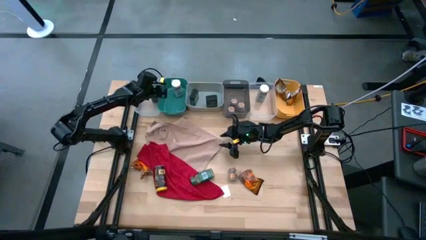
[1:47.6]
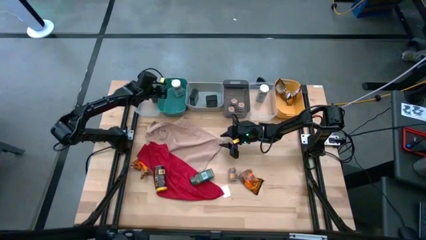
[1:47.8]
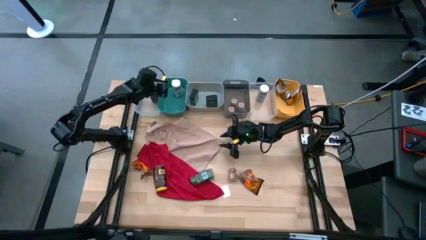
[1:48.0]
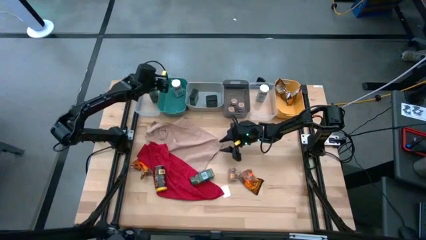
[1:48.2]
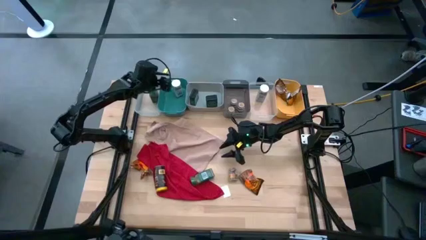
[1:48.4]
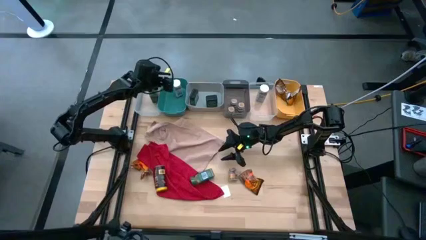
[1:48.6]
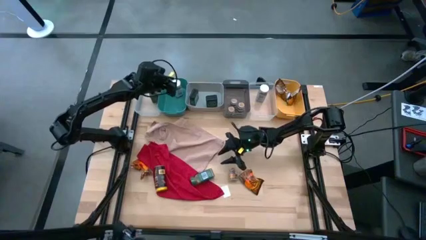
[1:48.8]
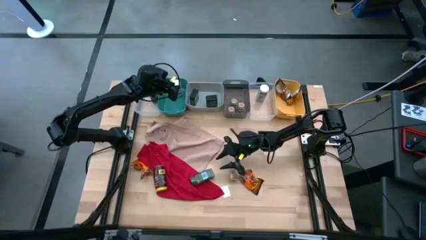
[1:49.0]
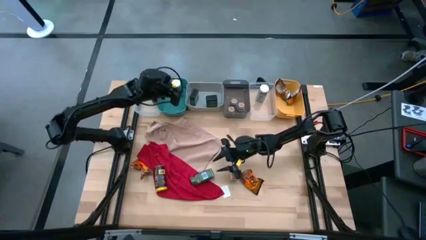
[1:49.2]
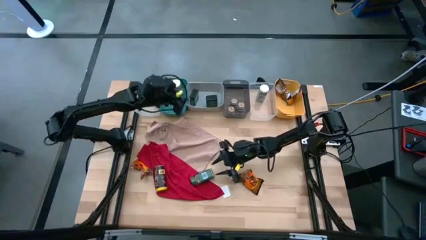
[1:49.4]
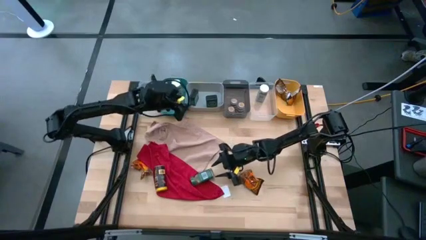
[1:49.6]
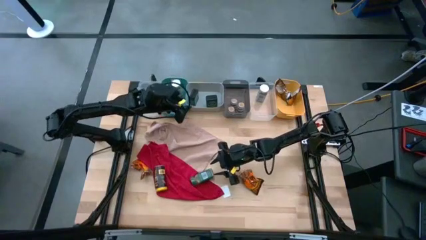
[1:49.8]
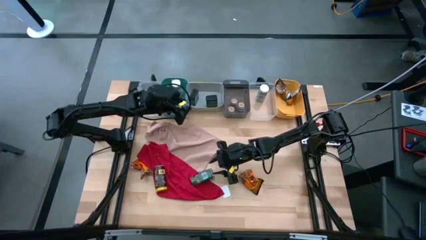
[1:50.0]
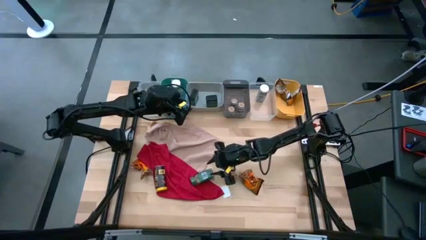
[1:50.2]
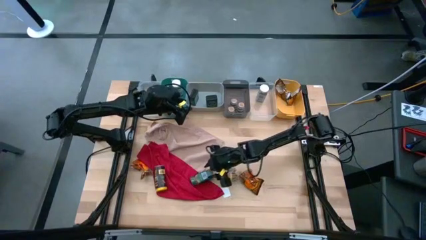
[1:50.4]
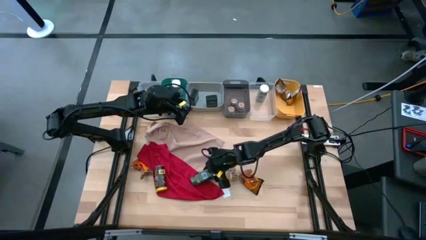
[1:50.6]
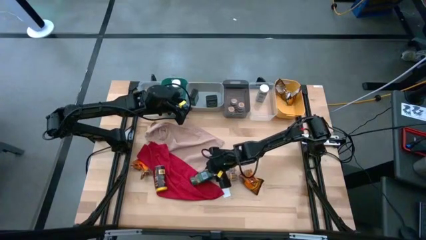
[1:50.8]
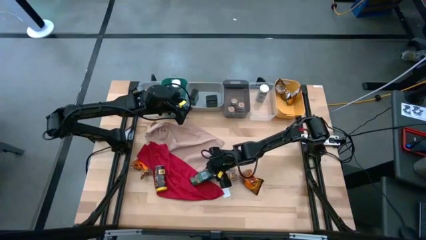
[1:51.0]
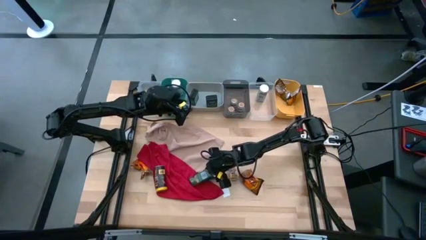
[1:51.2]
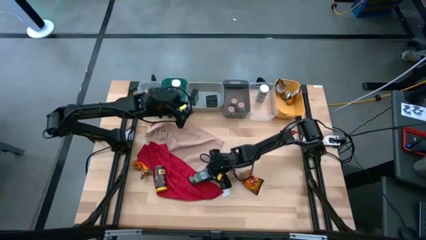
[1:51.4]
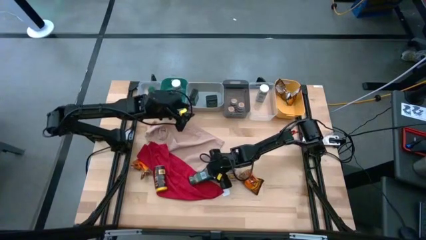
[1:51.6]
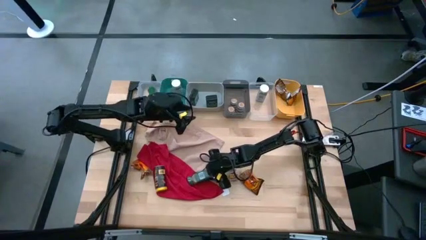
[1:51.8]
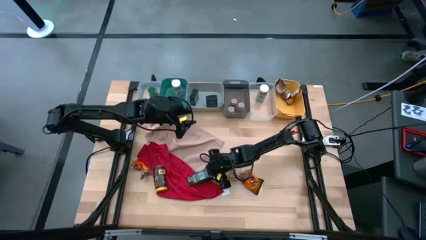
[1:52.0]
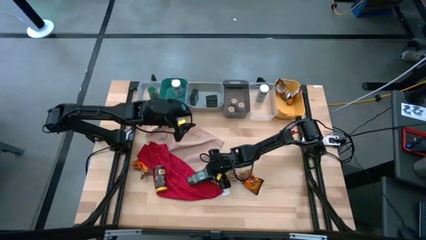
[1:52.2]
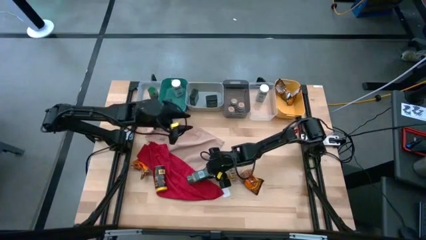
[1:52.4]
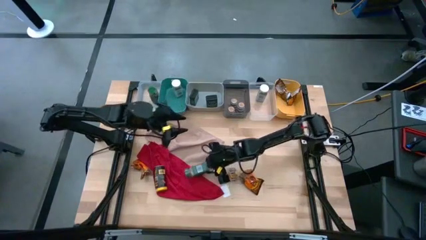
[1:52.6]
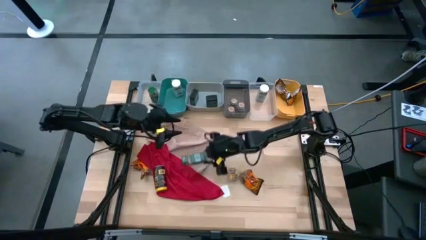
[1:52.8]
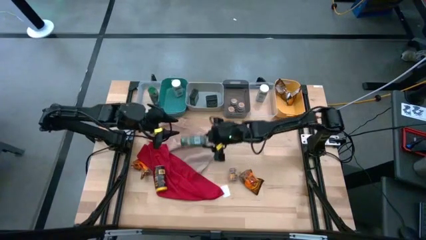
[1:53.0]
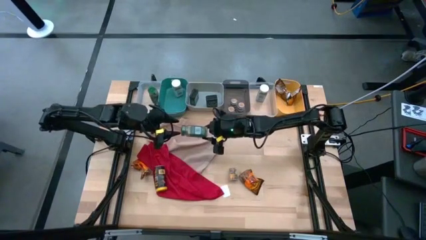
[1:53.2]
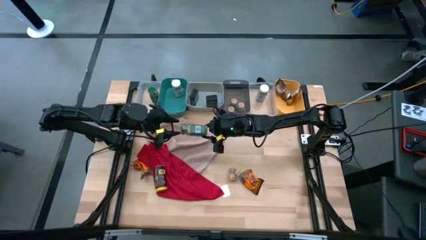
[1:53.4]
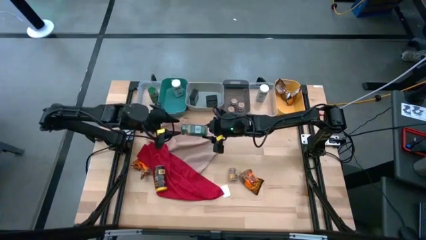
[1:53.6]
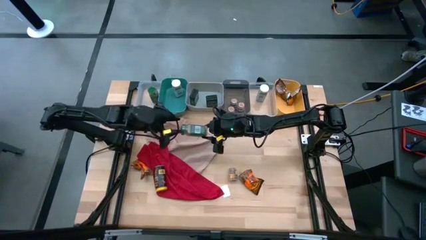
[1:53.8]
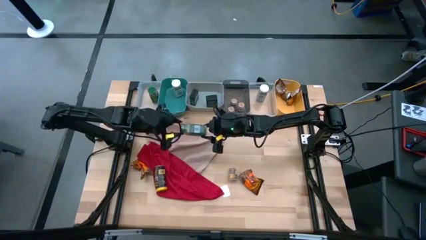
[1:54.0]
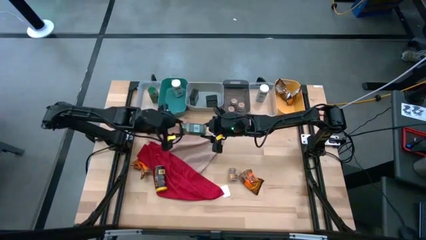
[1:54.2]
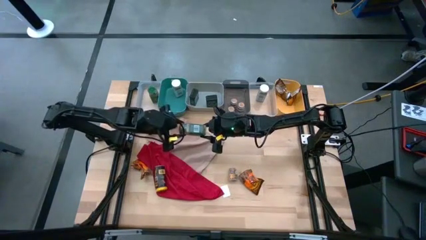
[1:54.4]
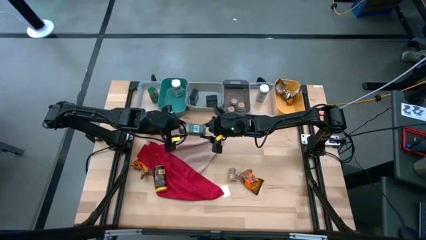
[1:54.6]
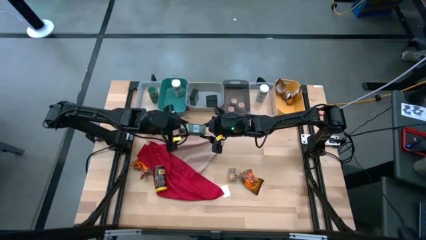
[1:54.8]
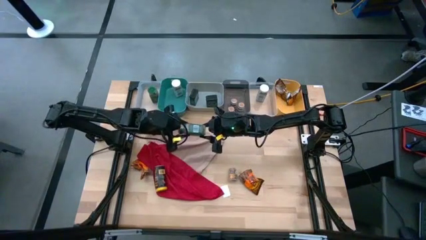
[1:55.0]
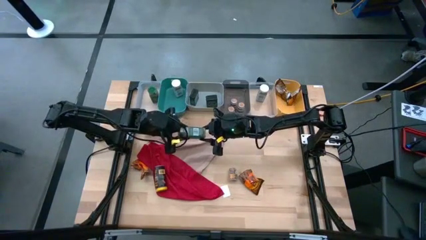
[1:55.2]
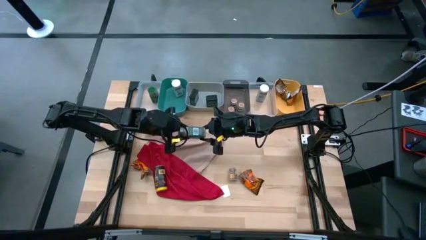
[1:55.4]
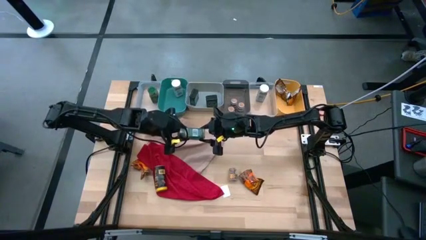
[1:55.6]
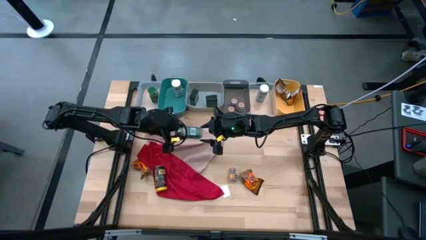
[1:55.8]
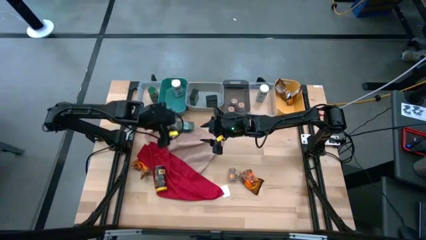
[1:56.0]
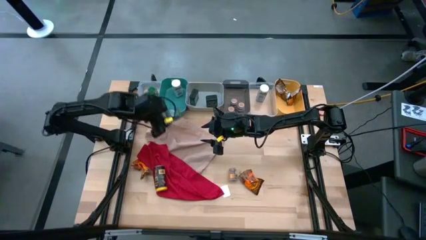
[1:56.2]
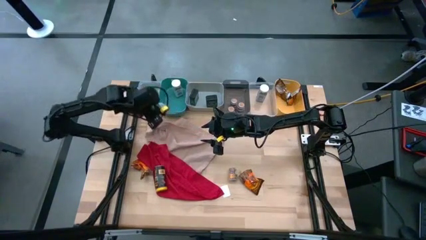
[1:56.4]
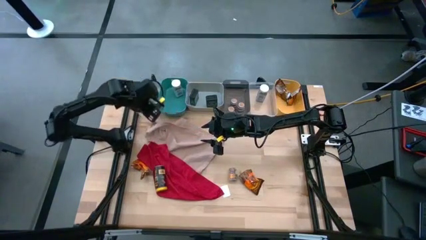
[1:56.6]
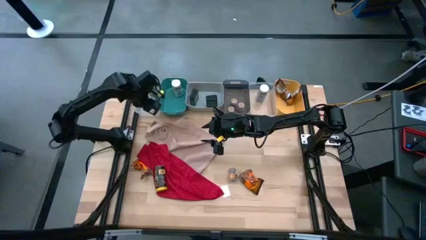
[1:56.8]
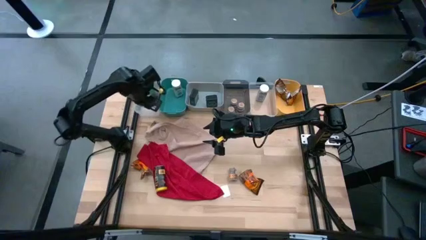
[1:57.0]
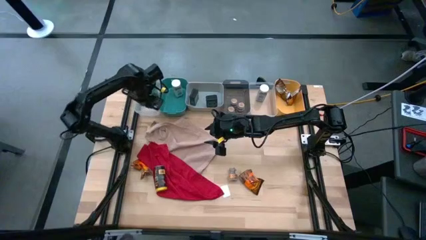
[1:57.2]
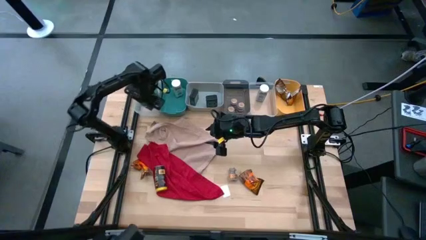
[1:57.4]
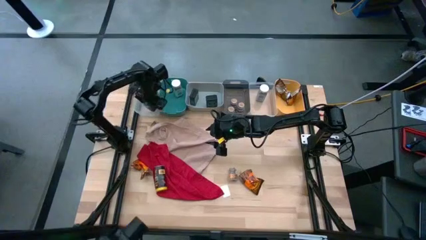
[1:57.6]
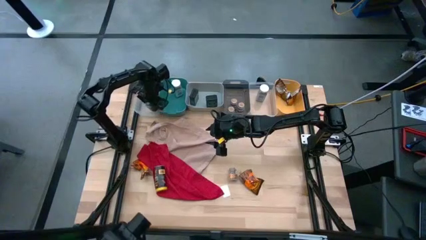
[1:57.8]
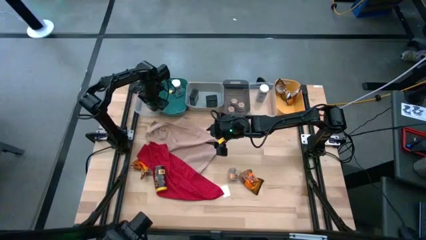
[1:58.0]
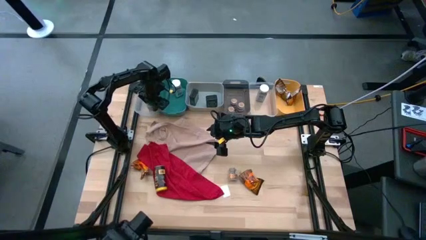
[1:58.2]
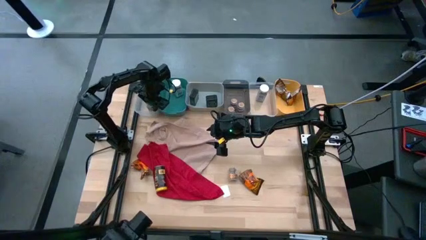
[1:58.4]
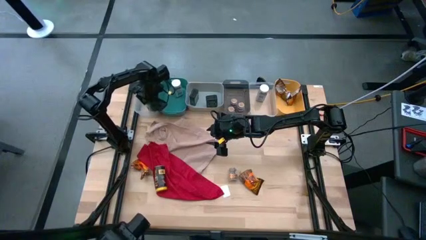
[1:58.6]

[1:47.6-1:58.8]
Task: Sort spices by type
Put the green seasoning bottle into the blue transparent bin

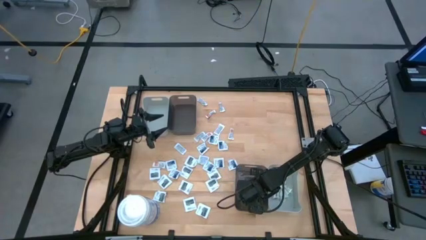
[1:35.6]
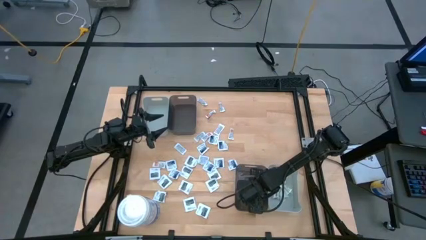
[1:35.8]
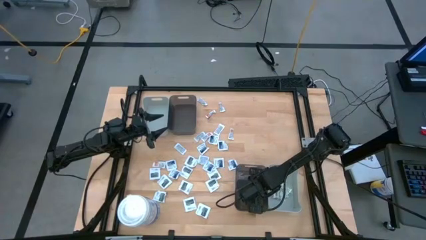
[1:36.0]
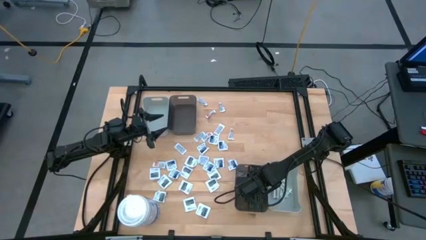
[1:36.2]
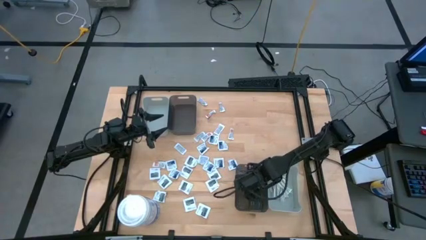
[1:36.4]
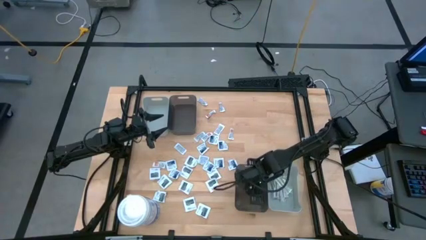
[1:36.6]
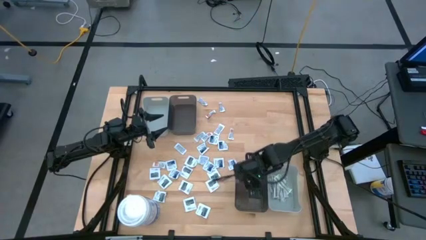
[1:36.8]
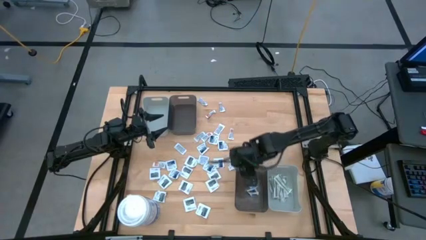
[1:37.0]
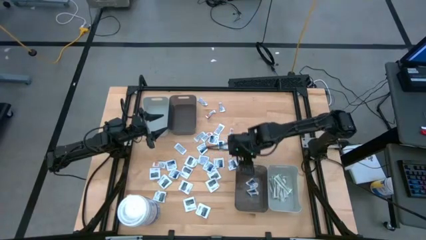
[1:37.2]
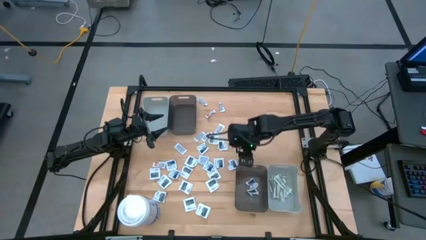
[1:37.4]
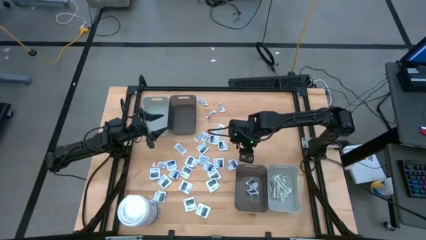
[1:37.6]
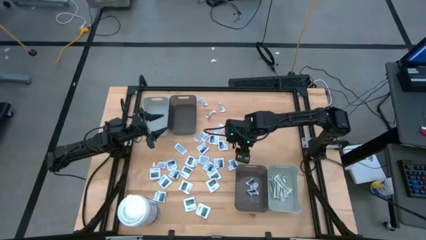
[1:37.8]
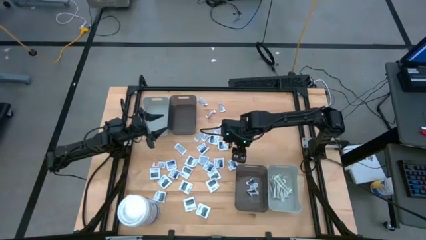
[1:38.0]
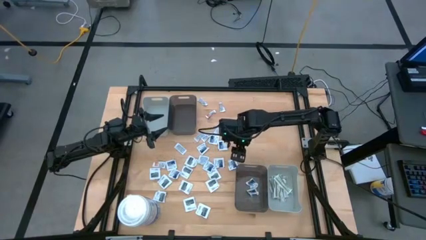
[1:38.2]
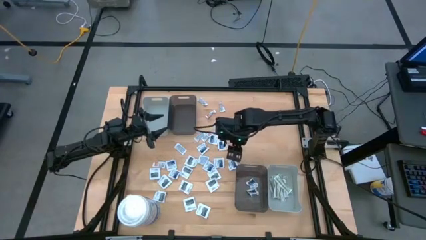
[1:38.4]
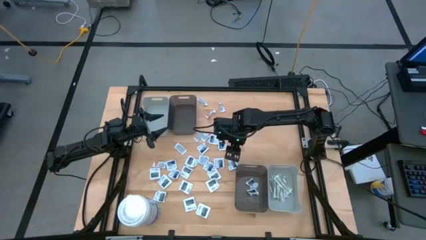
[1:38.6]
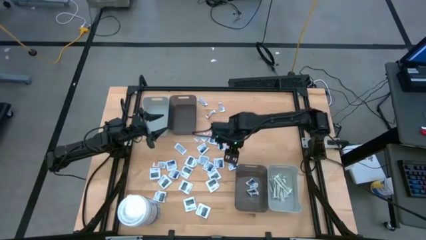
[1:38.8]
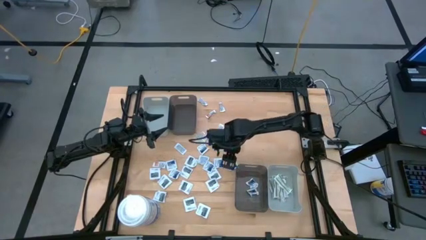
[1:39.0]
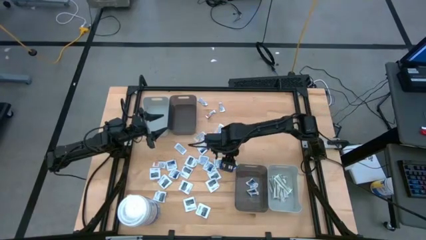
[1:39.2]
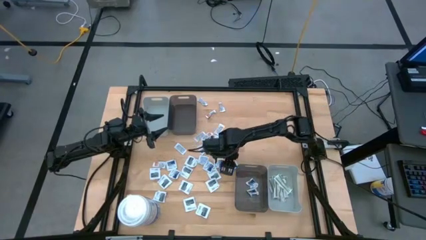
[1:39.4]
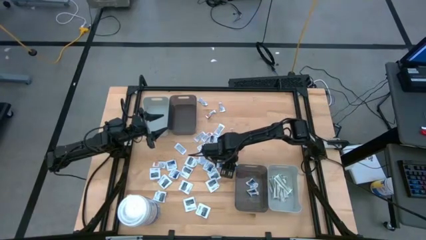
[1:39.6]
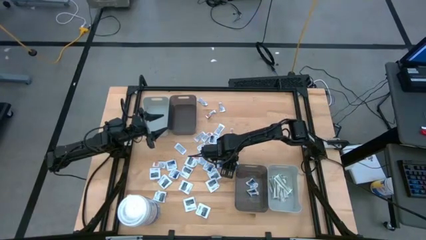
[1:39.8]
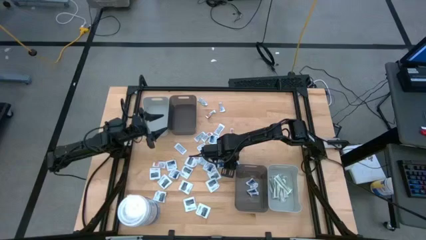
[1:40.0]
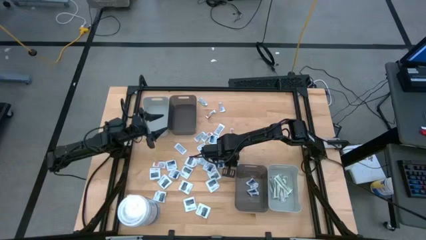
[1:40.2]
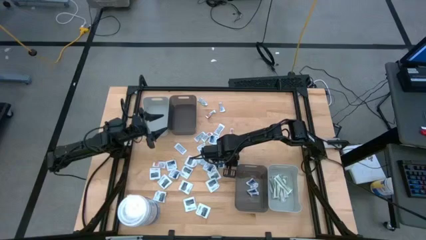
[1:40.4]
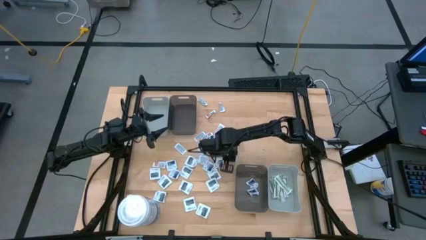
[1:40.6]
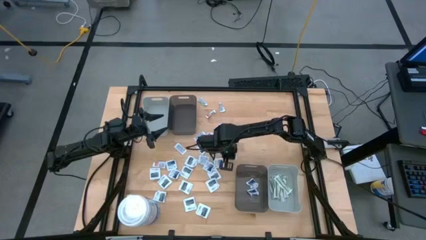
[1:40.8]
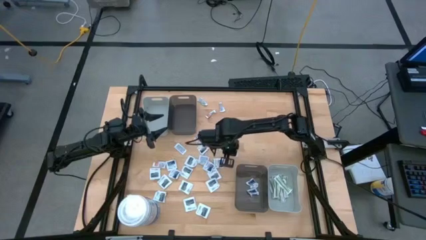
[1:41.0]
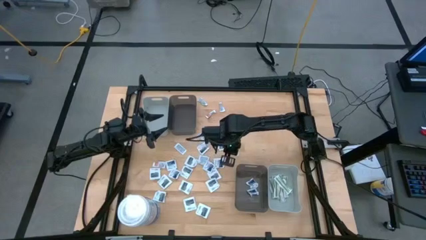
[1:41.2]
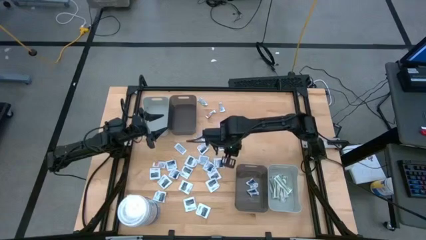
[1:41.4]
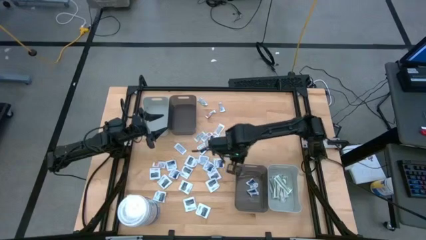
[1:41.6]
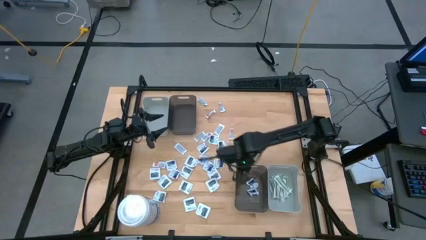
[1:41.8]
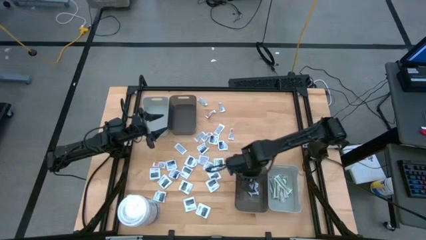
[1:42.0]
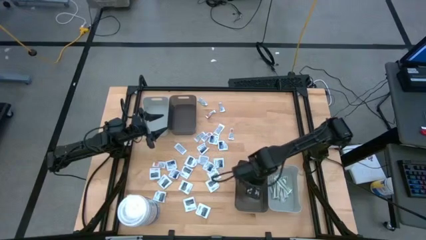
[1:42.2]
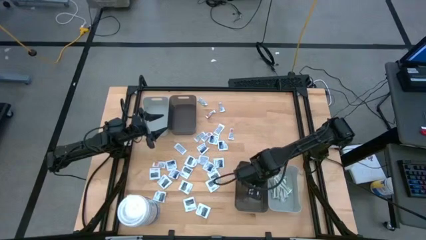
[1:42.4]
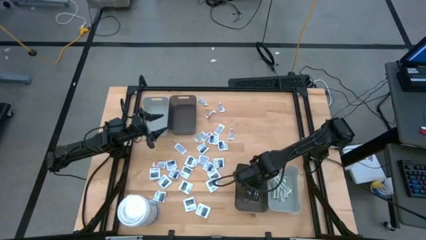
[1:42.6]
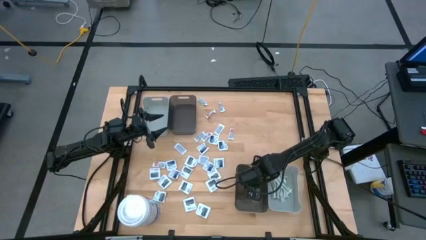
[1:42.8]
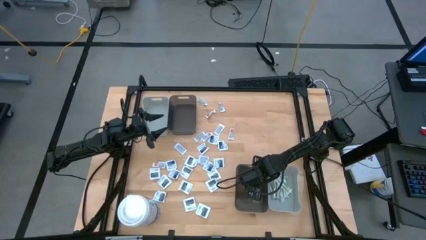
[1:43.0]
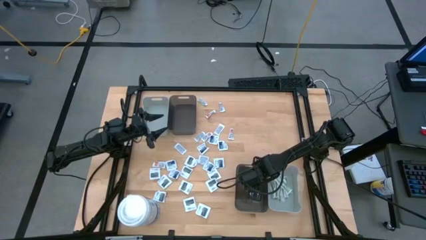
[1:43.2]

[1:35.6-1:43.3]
Task: Pick & Place First Aid Supplies
Put the white alcohol pad into the bottom black bin
